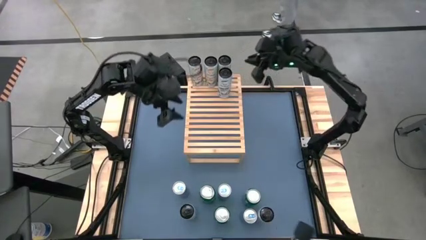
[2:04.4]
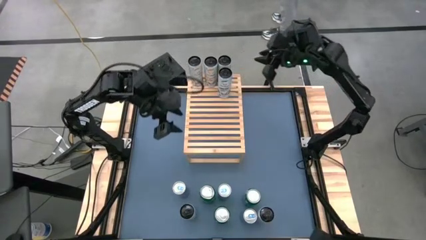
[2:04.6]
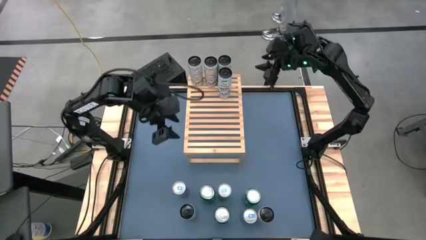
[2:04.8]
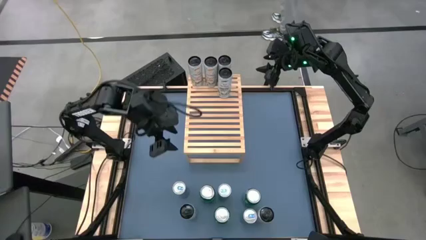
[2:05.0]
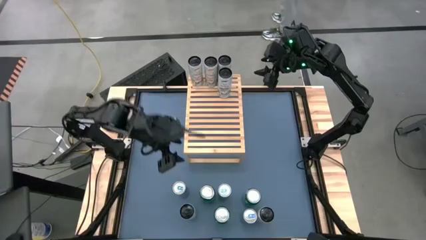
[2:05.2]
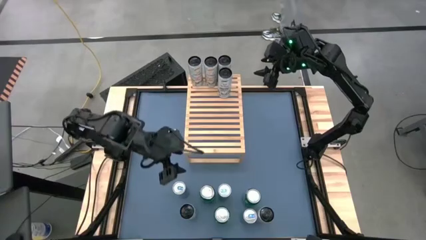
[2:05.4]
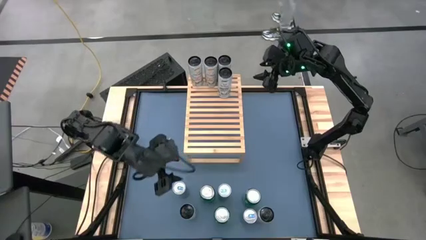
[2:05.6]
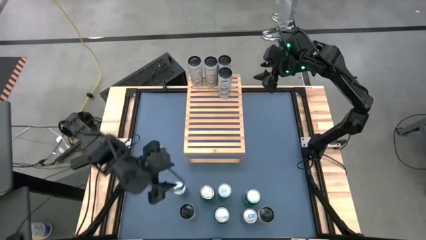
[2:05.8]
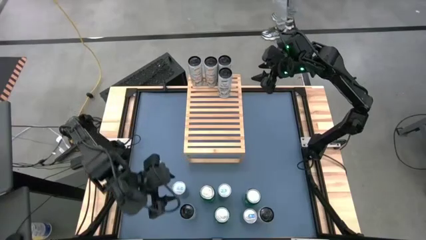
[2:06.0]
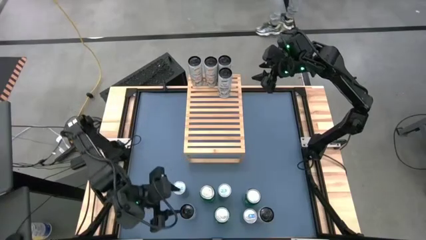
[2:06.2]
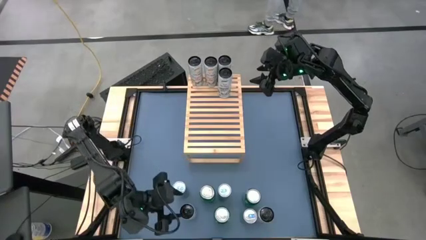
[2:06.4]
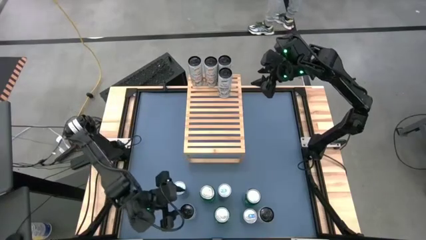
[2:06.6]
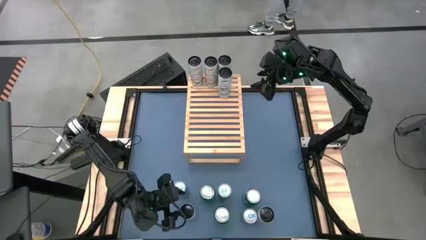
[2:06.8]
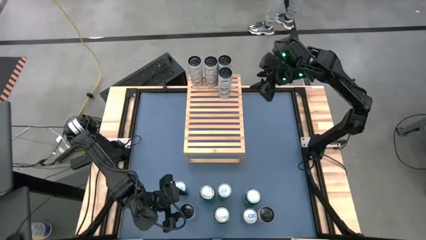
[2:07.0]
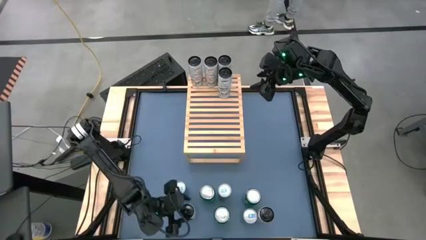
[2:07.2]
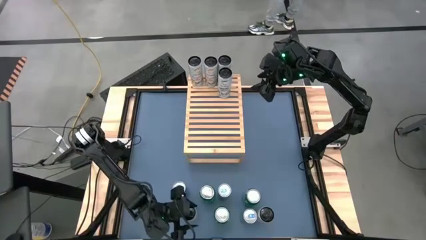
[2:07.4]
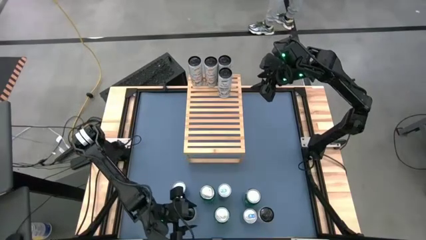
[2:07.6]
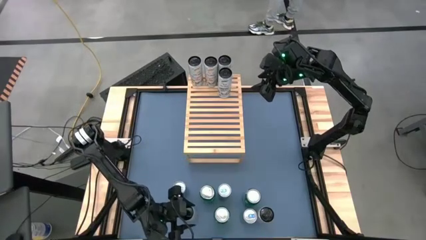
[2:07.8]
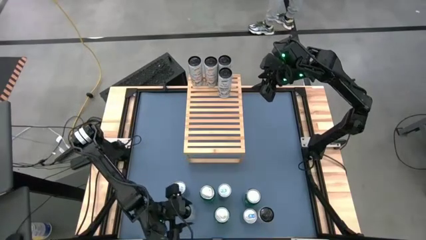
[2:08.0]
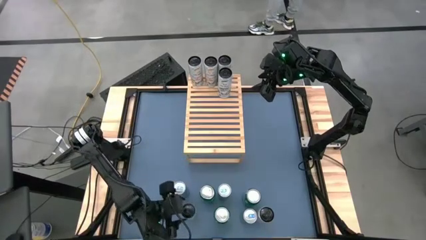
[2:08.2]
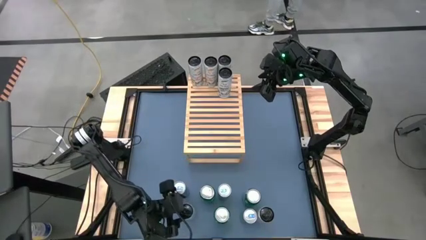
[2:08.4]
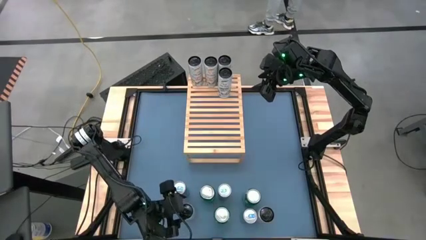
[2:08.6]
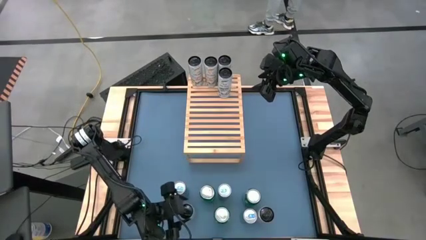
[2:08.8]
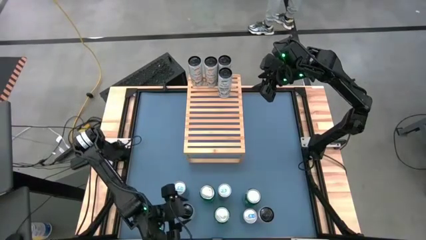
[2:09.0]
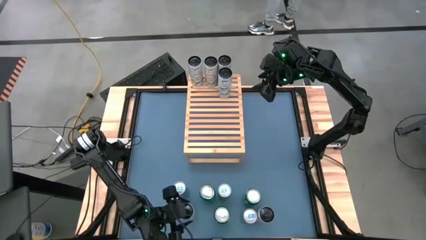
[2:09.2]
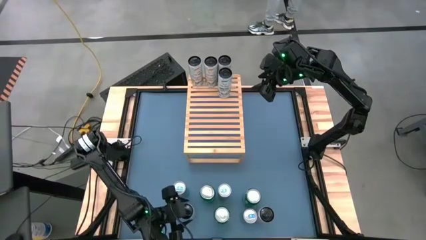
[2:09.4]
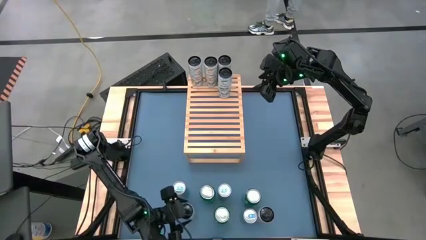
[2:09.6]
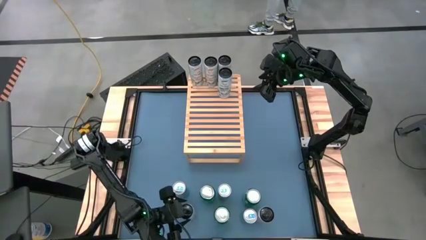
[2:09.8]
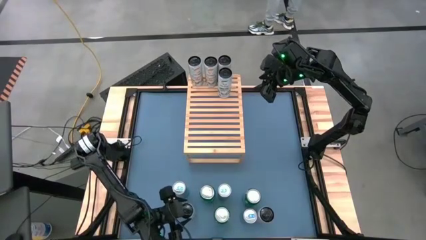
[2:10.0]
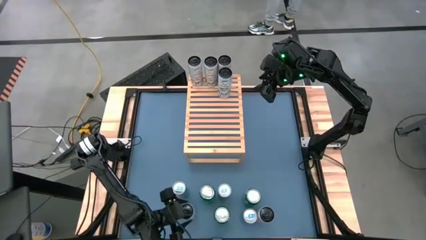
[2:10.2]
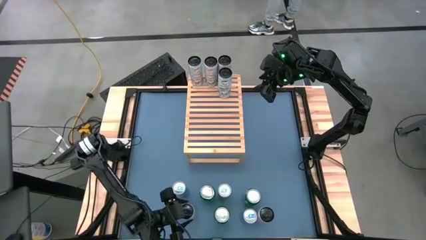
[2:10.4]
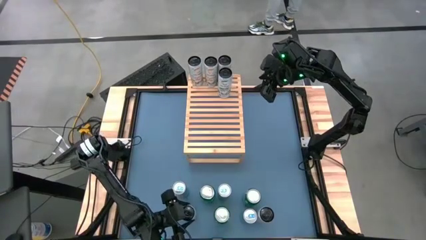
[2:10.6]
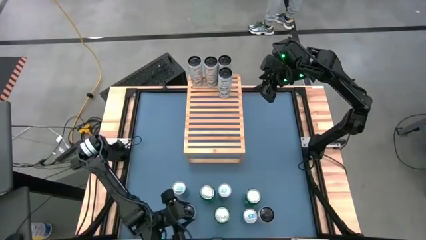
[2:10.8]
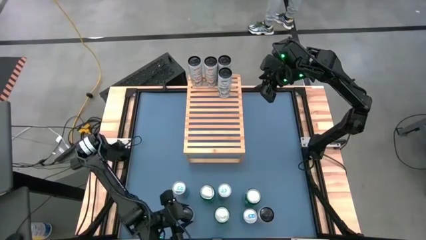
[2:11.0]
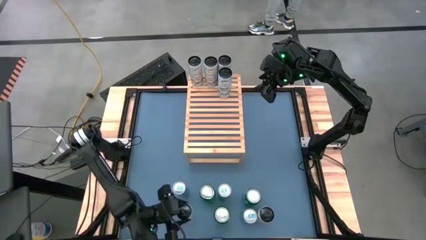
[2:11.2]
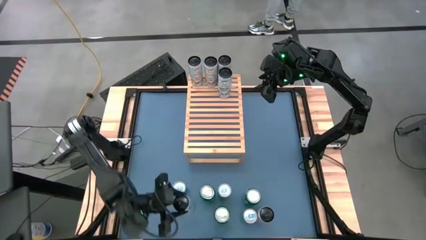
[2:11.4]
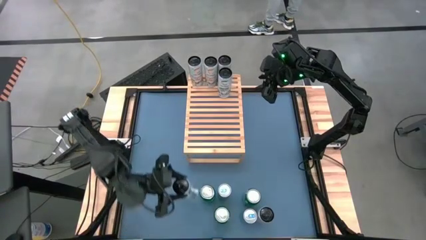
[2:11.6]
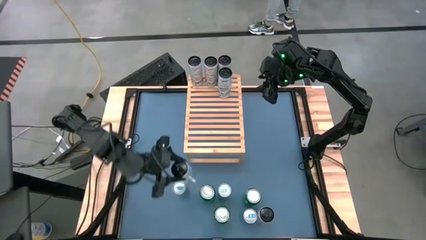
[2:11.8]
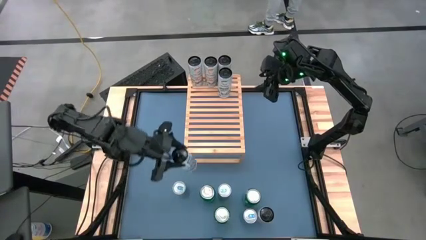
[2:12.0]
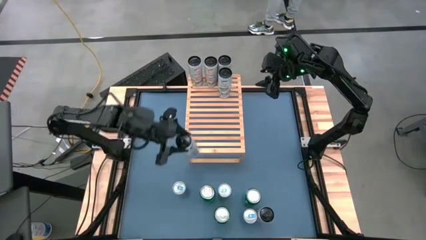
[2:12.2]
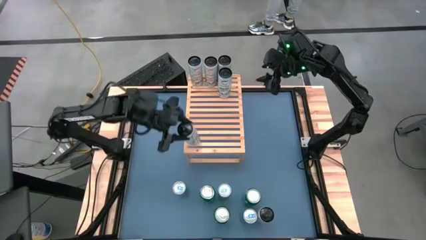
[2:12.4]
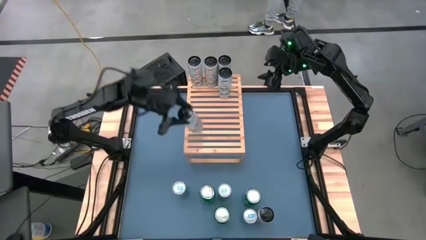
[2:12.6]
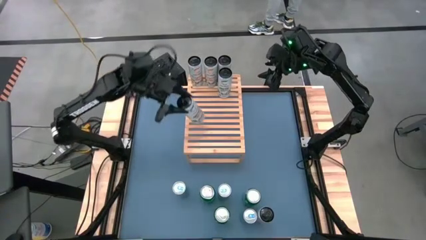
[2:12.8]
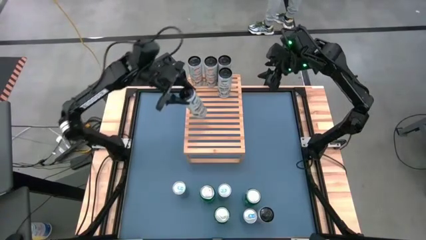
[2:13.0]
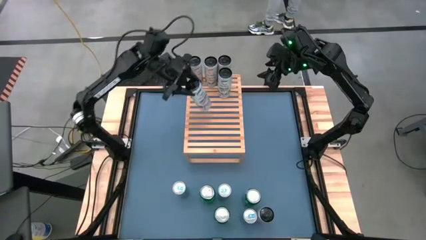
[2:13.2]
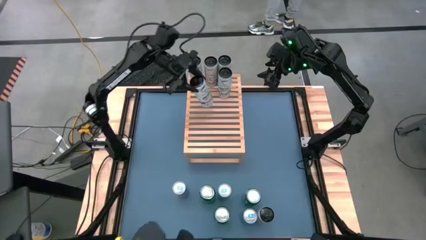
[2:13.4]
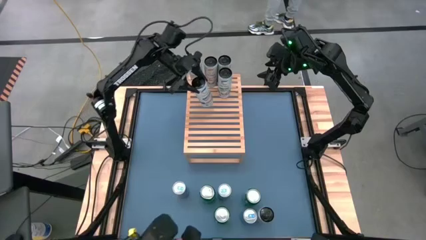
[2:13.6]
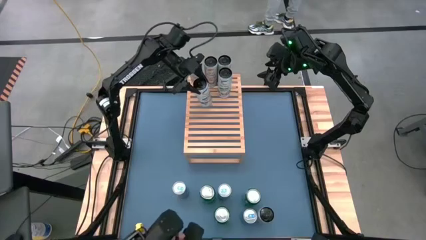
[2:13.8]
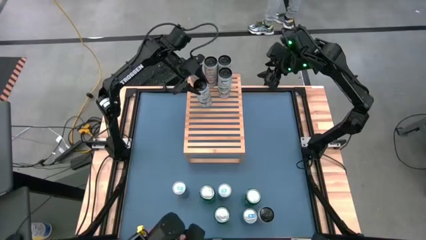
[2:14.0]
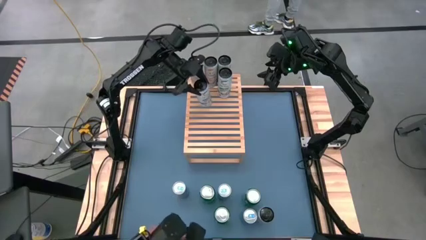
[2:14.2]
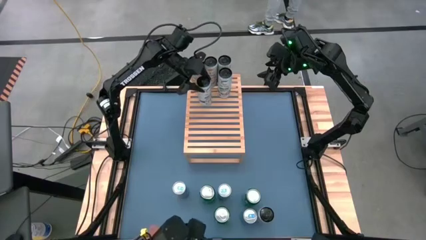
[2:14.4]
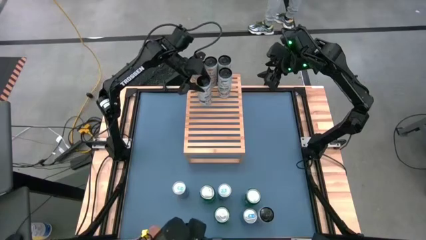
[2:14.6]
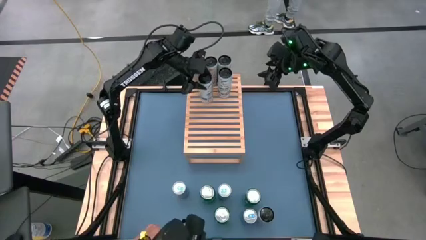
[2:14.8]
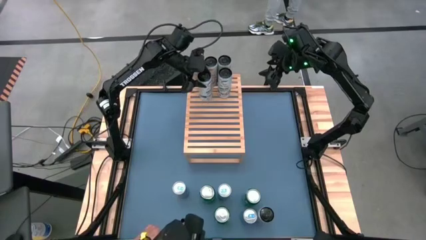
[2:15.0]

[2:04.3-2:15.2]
Task: Place canned beverage on shelf
Put the white blue soda can on the shelf aligned with the other white blue soda can
